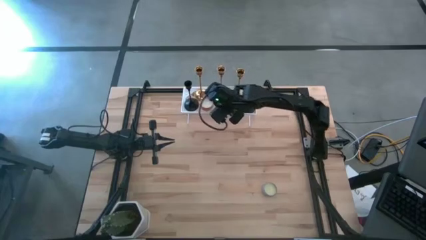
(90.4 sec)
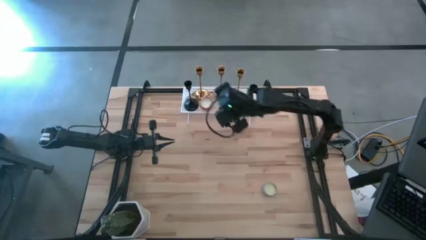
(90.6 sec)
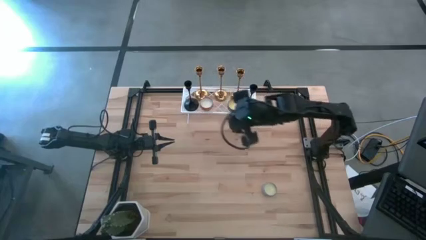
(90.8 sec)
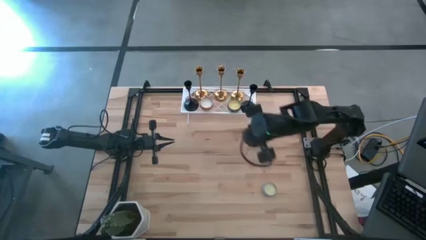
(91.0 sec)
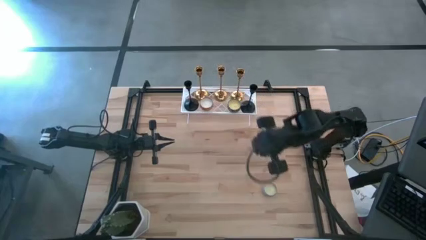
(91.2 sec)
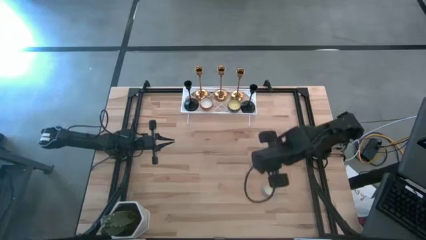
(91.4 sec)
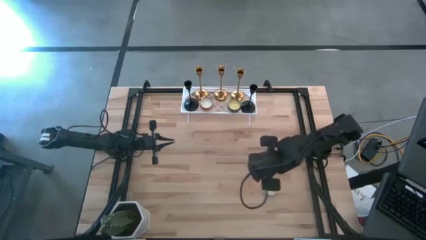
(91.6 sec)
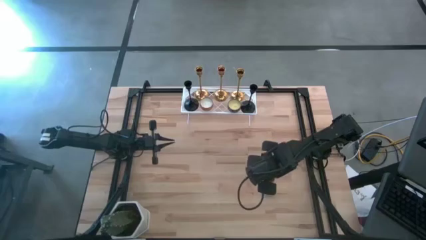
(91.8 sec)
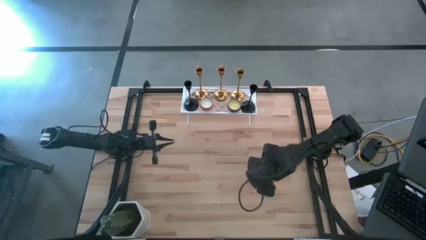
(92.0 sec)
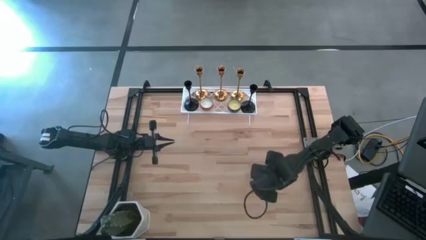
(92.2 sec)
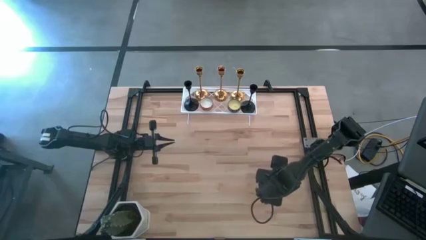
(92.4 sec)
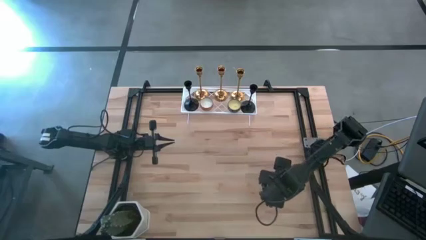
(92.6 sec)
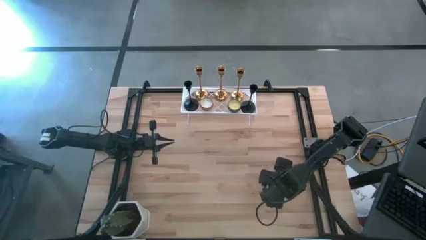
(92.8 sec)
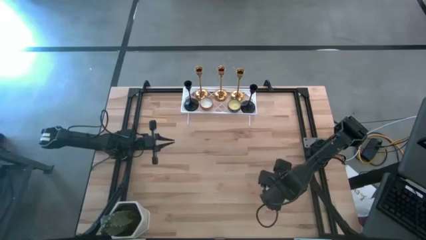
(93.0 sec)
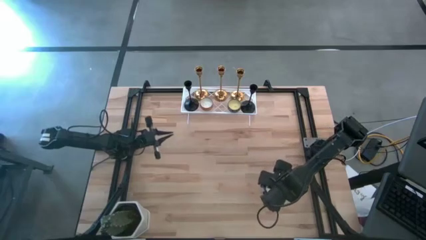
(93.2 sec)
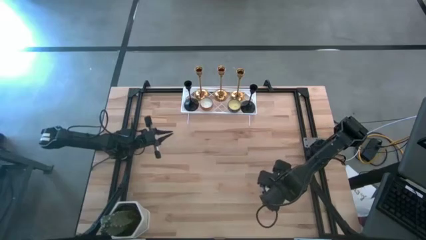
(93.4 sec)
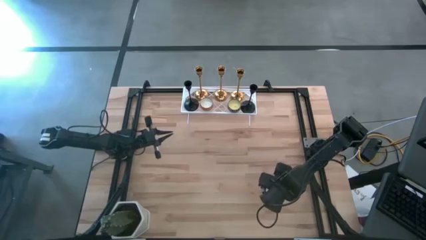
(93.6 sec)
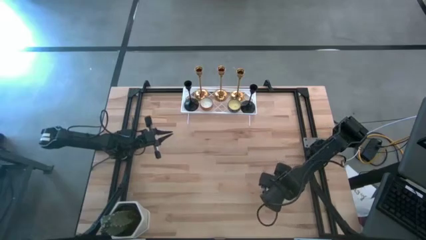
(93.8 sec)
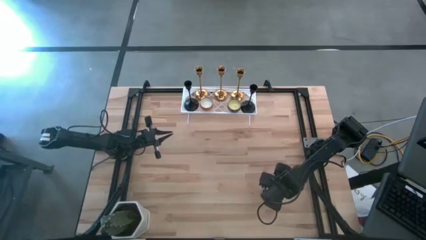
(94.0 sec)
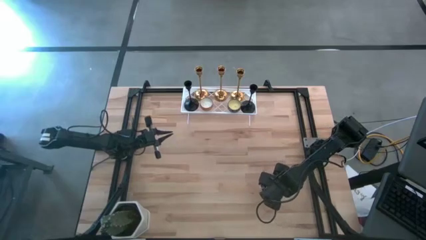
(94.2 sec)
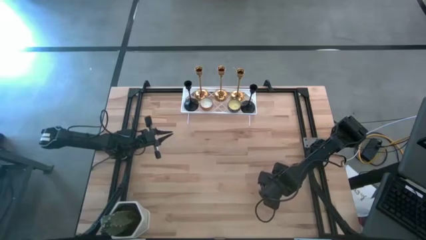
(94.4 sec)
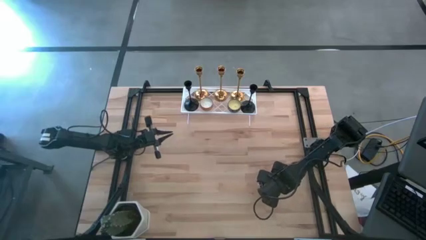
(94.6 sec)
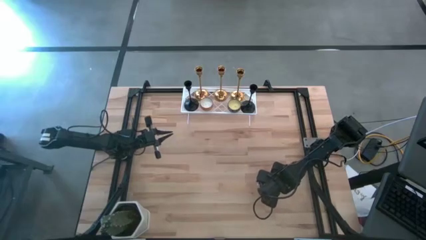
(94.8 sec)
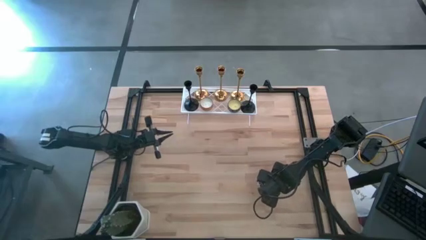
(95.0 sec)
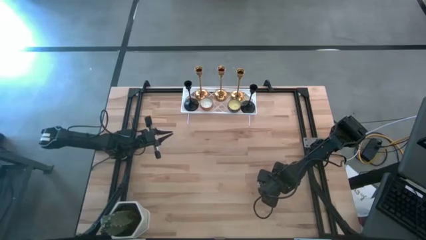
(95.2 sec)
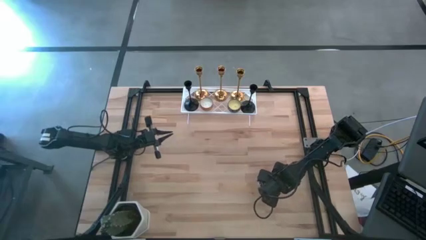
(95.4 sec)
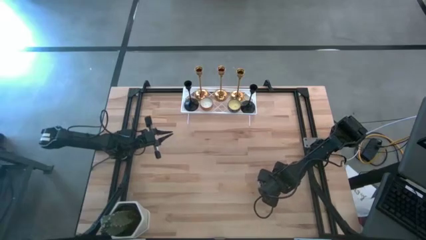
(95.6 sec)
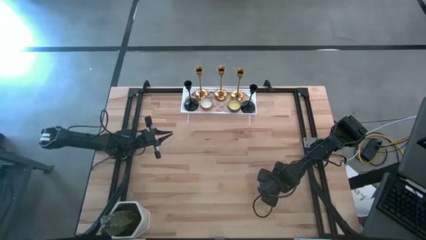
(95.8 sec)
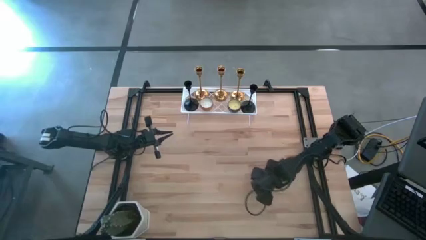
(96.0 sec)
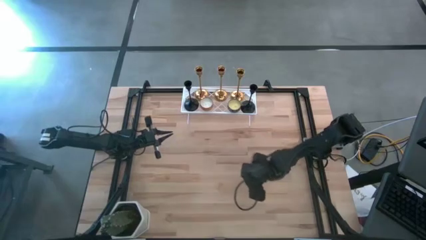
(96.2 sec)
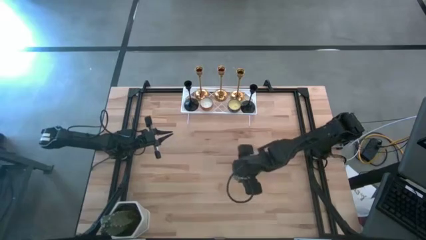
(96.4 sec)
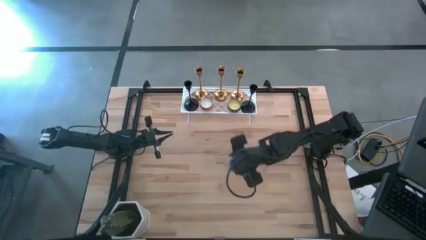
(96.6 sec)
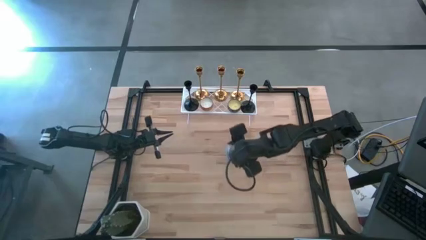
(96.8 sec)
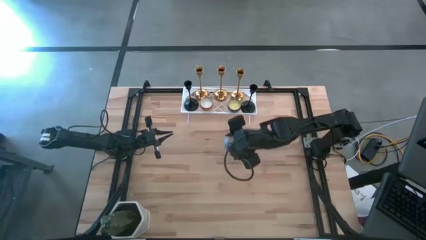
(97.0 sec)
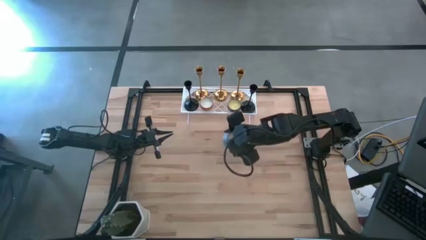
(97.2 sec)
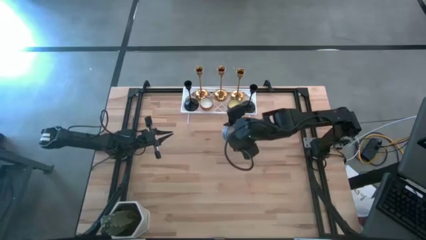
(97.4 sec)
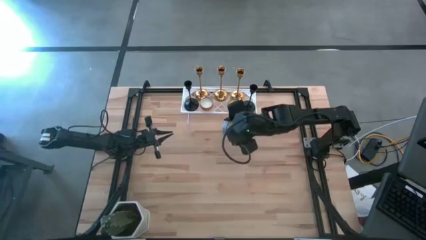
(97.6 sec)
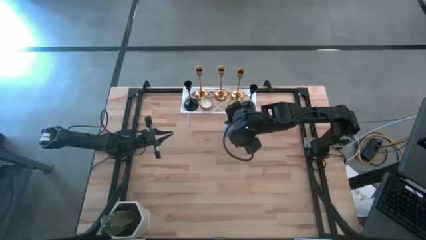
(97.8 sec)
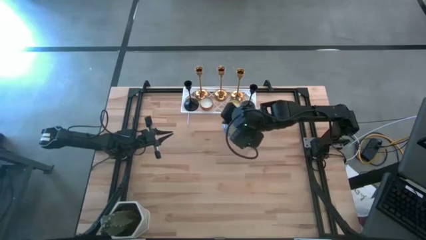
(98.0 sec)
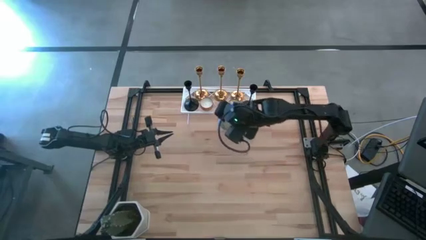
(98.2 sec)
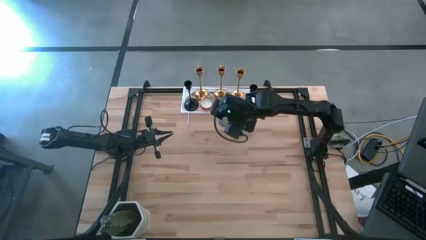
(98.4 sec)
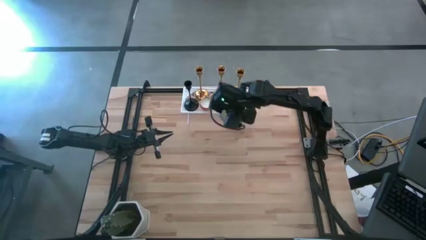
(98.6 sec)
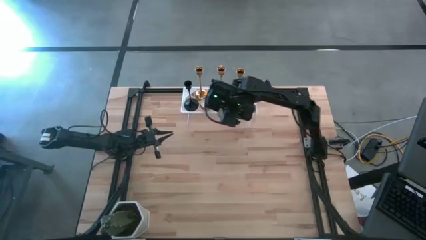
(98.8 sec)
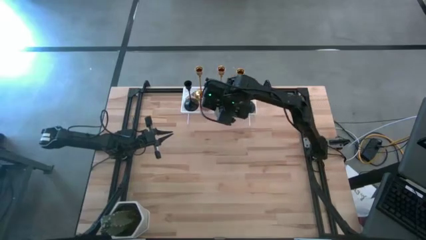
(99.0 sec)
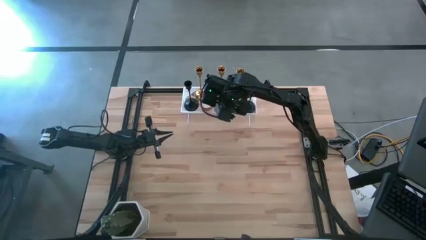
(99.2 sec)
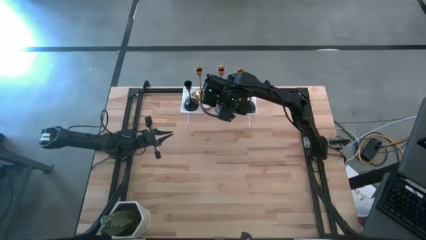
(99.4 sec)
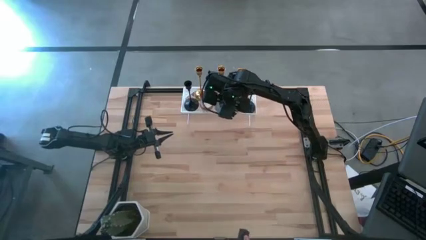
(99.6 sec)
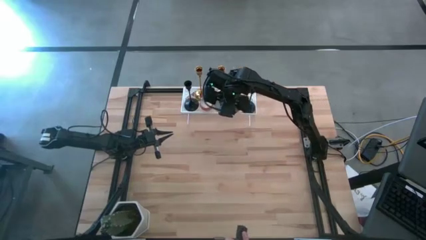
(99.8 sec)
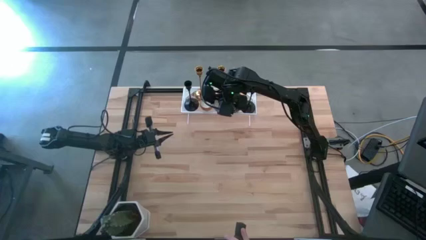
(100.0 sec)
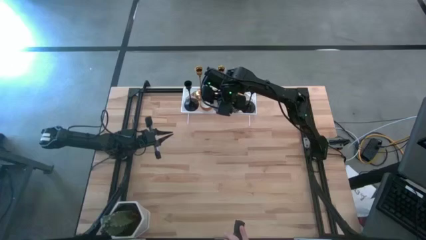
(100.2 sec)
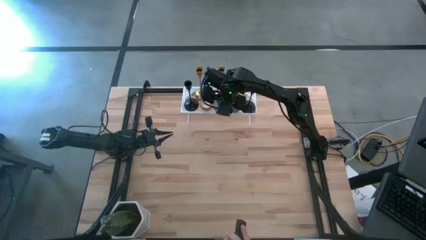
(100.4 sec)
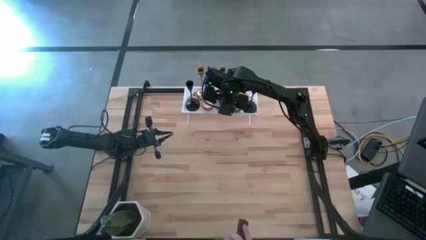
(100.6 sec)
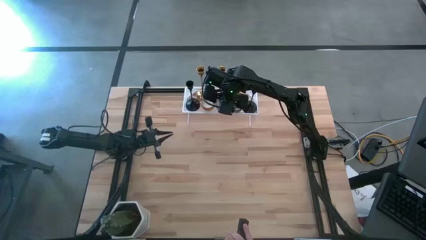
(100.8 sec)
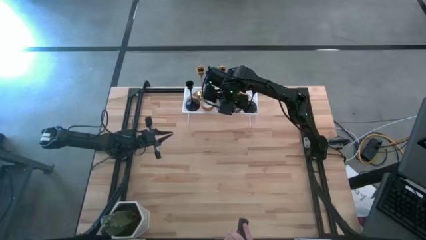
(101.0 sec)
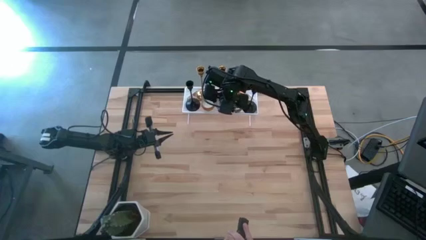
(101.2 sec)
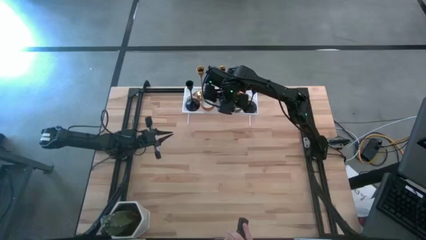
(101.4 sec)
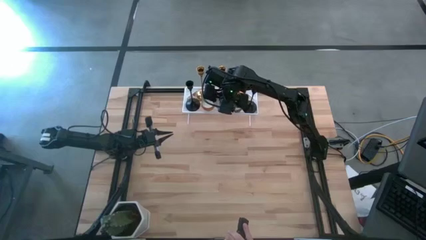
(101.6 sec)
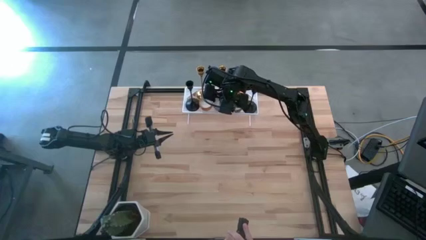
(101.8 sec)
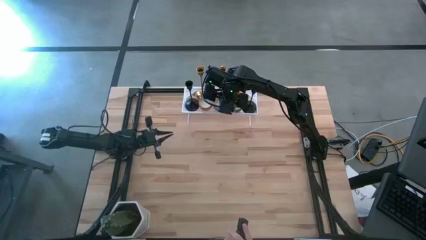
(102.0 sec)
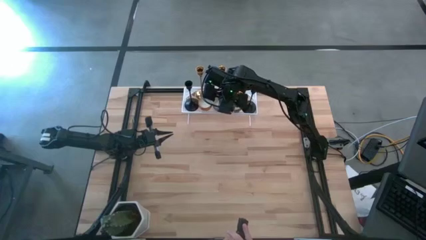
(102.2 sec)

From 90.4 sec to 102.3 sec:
Task: Pick & Place candle stick holders
Put the scented light yellow candle on the shelf

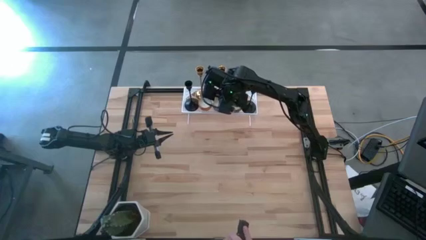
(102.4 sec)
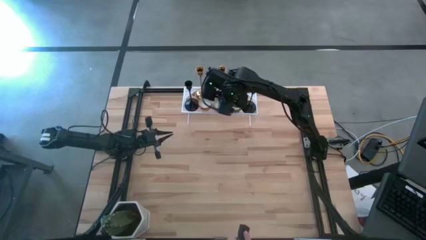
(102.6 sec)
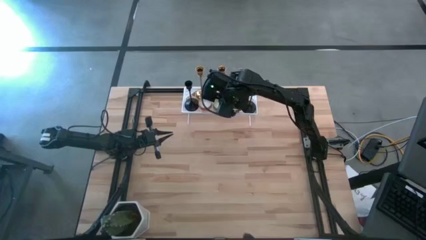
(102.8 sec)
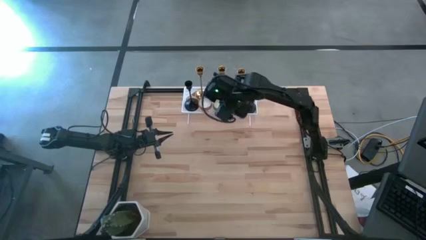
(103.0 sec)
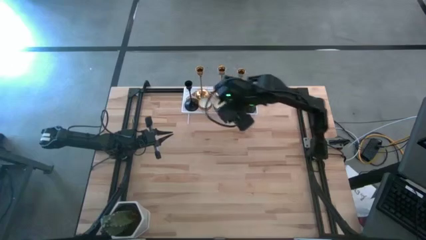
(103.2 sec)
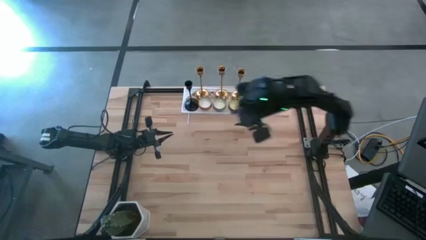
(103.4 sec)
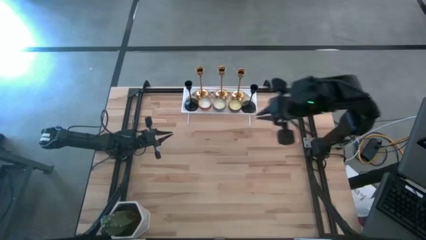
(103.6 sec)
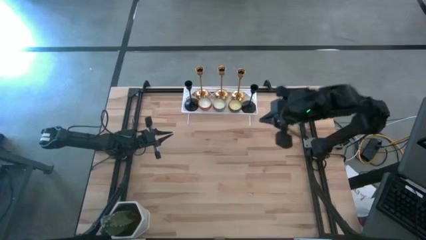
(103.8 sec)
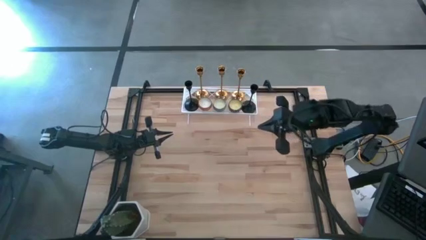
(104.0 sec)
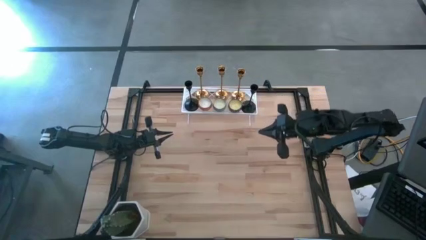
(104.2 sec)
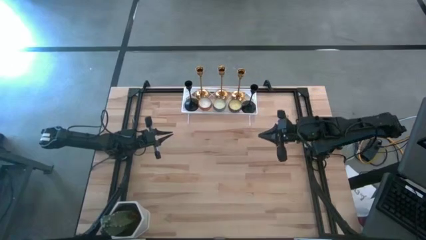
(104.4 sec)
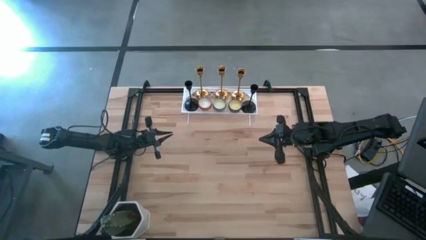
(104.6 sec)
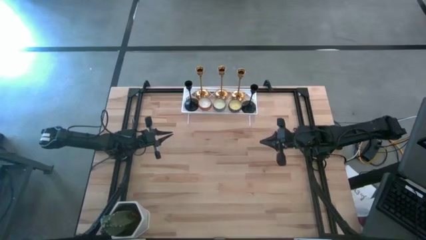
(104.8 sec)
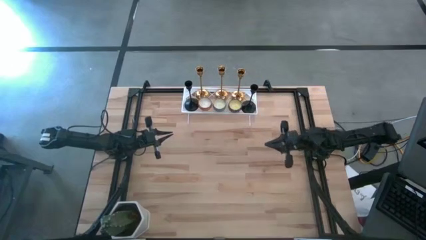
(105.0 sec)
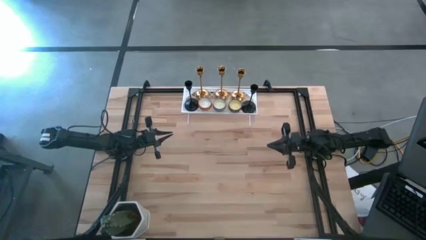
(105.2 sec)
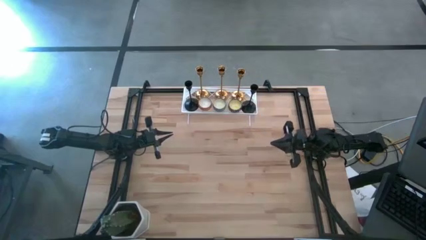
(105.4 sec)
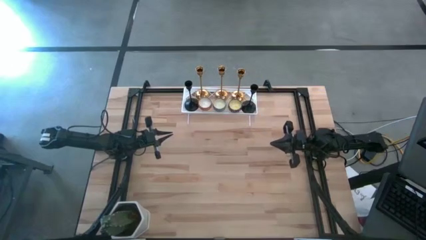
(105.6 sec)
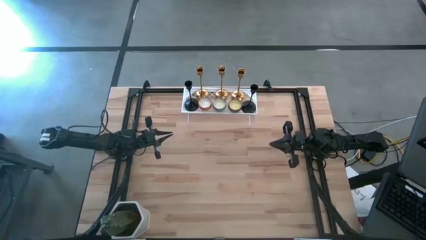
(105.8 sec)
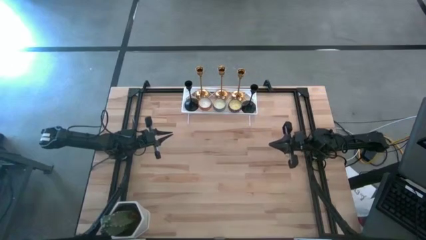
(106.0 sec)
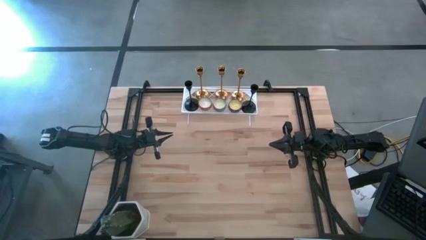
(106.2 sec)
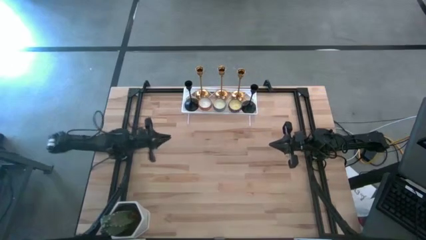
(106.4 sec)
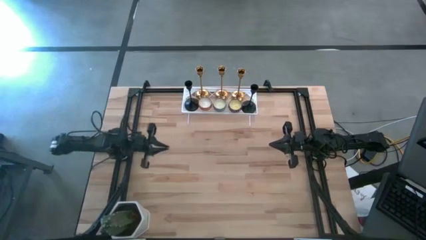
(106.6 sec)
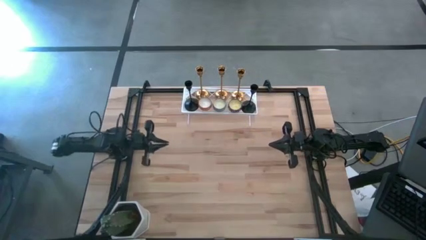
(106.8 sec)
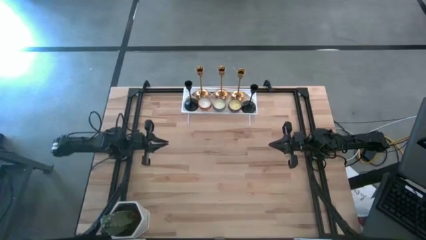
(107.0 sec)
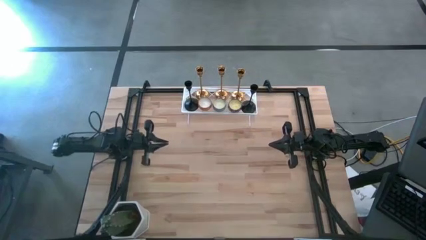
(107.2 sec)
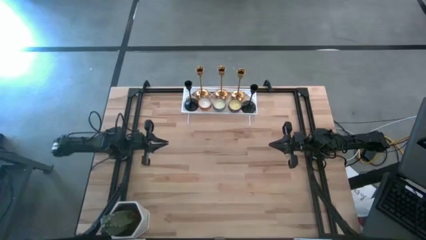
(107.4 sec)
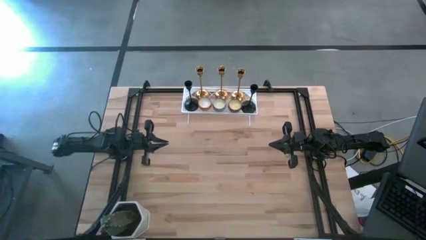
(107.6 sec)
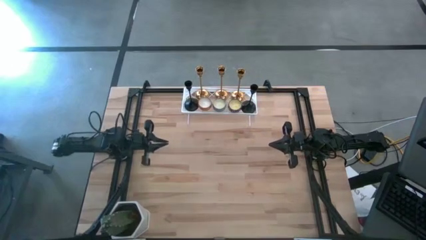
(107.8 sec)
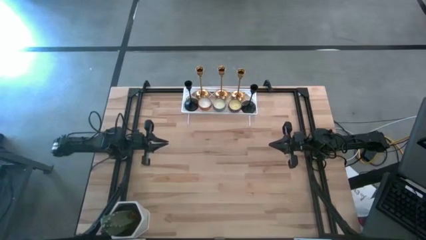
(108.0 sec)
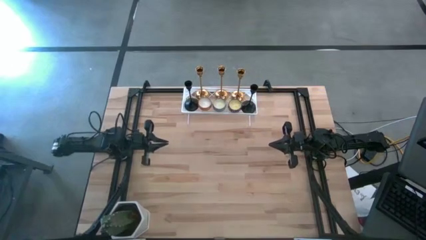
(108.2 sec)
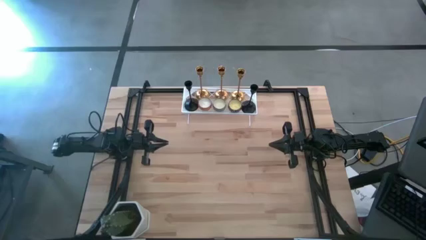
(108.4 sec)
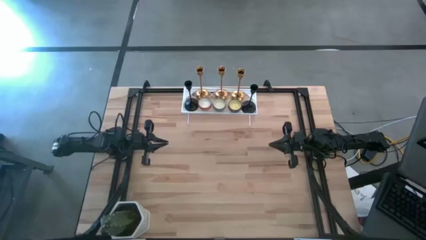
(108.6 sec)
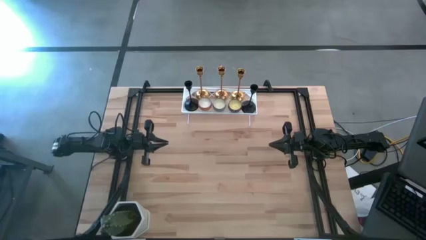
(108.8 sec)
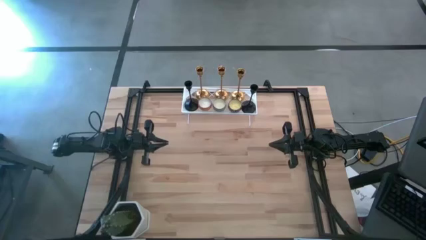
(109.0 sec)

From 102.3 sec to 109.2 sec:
Return to Home Position
